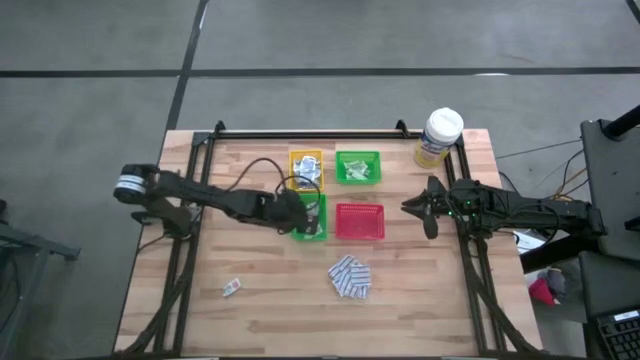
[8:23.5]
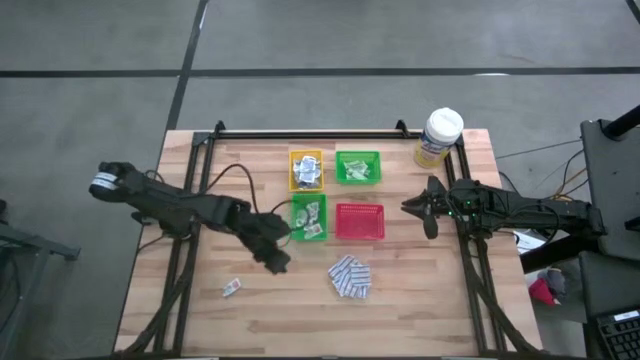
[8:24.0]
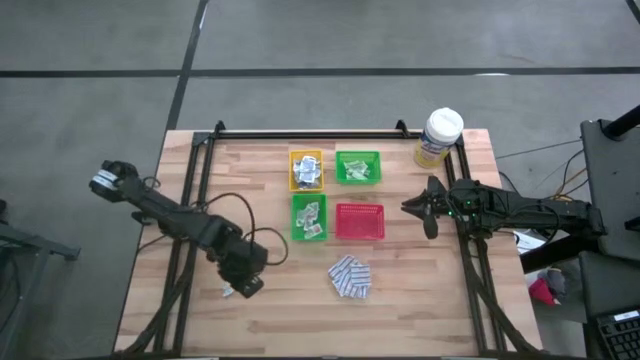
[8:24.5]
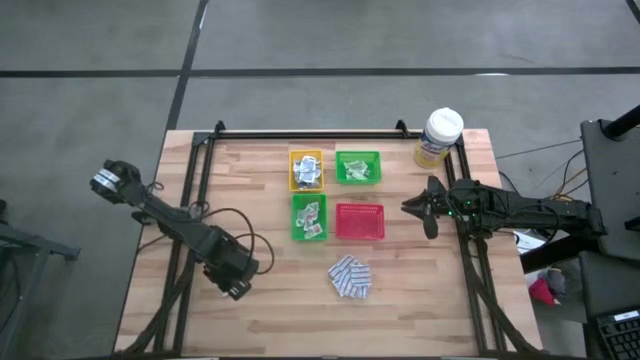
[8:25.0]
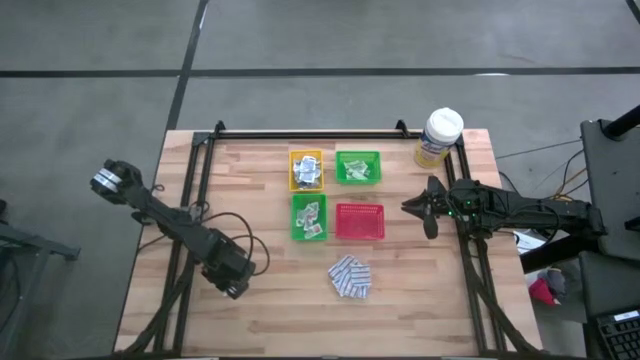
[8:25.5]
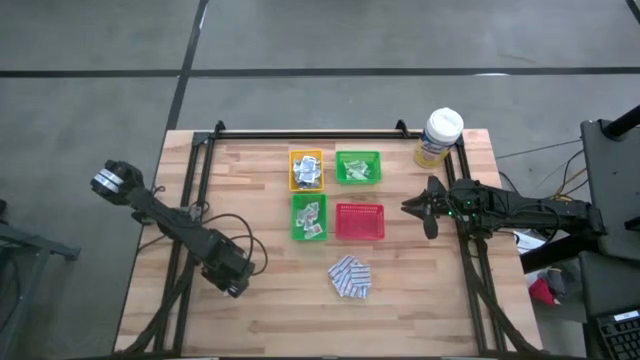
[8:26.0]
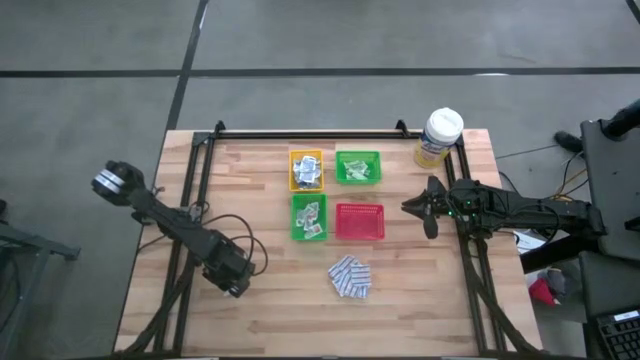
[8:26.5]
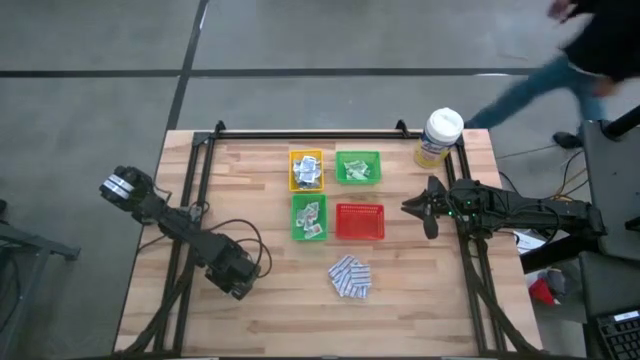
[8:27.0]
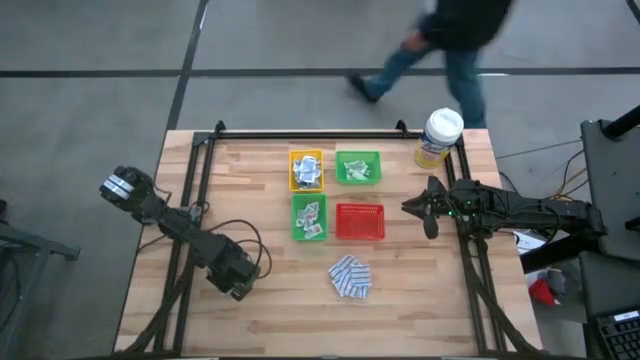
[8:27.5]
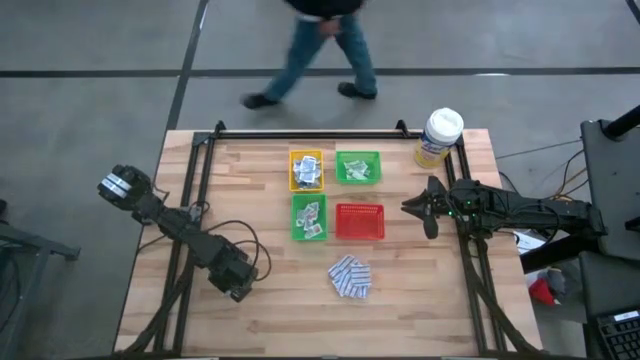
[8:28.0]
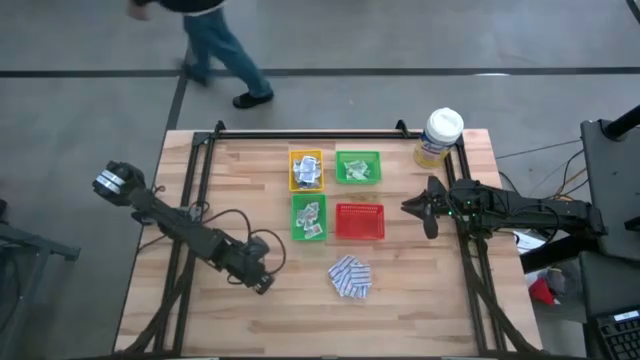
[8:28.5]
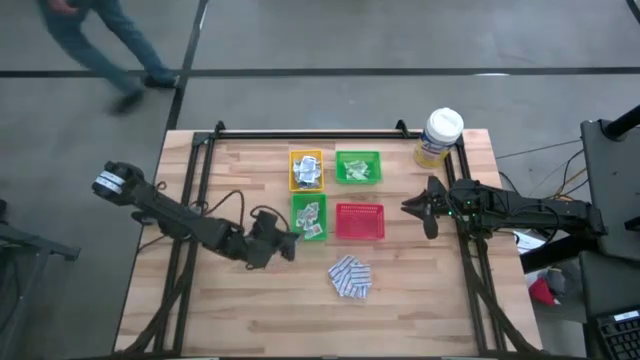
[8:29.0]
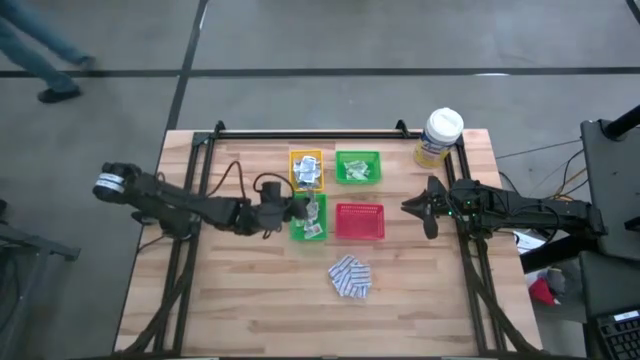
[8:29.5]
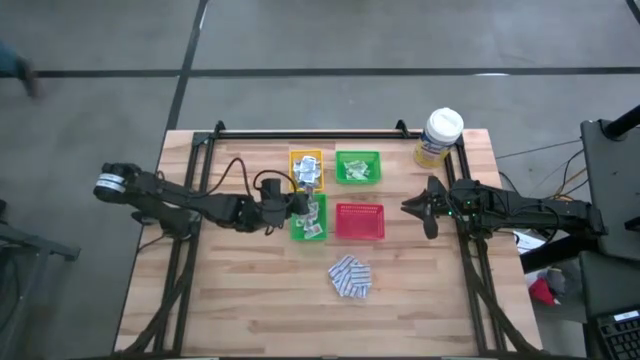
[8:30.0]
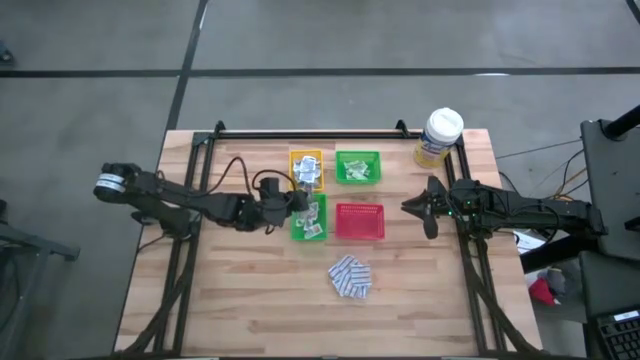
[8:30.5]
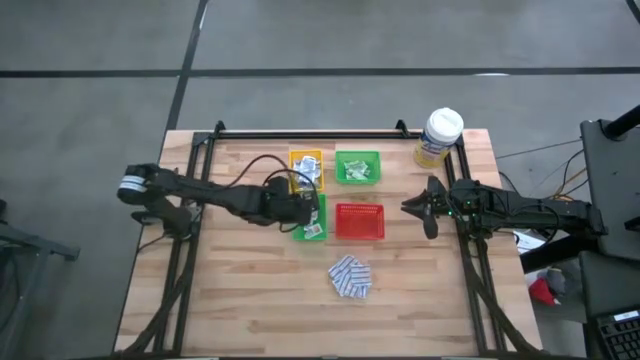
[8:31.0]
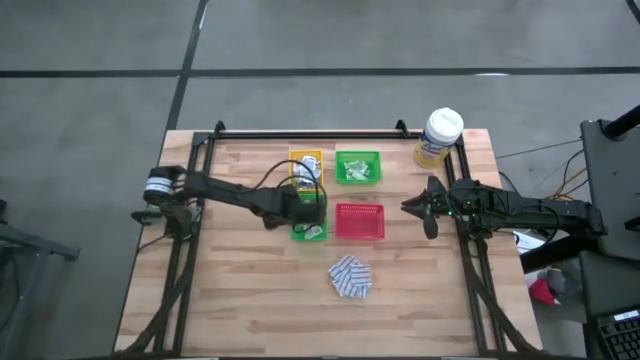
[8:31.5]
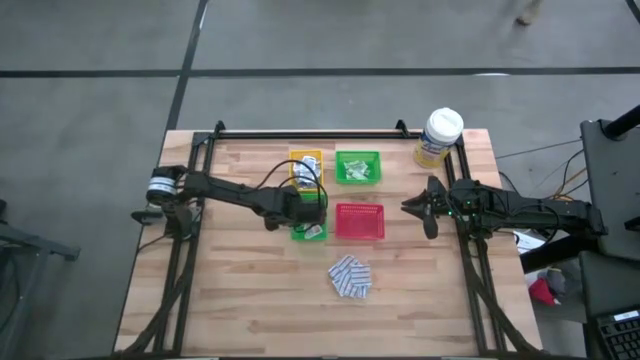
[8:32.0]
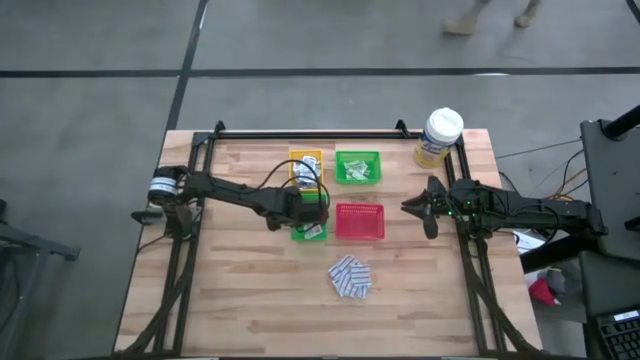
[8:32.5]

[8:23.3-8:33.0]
Task: Pick & Place First Aid Supplies
Put the orange ointment pack into the bottom green bin

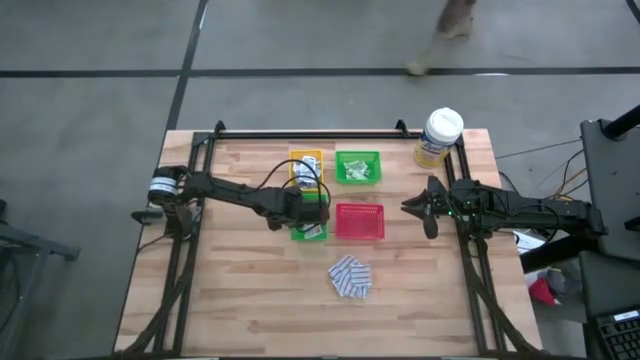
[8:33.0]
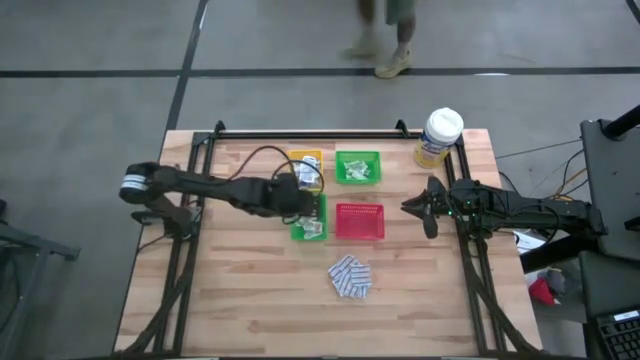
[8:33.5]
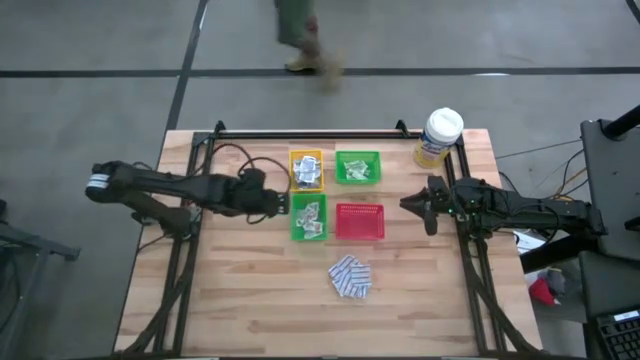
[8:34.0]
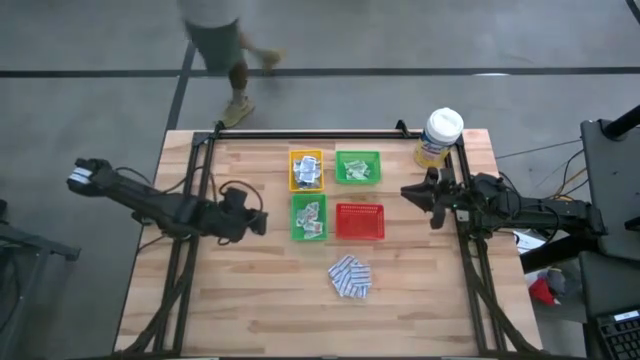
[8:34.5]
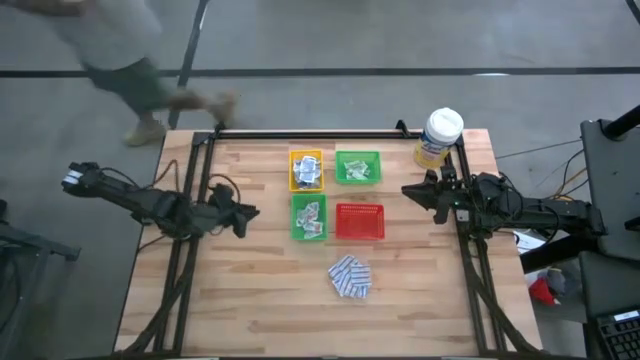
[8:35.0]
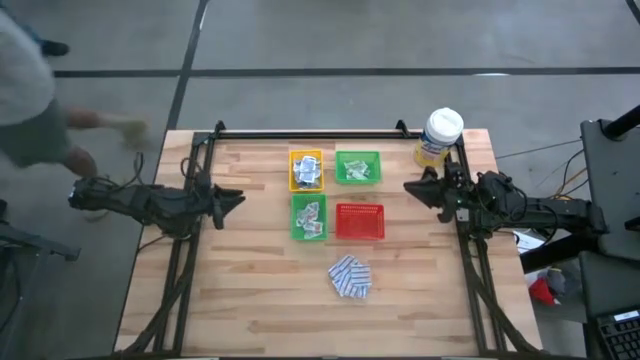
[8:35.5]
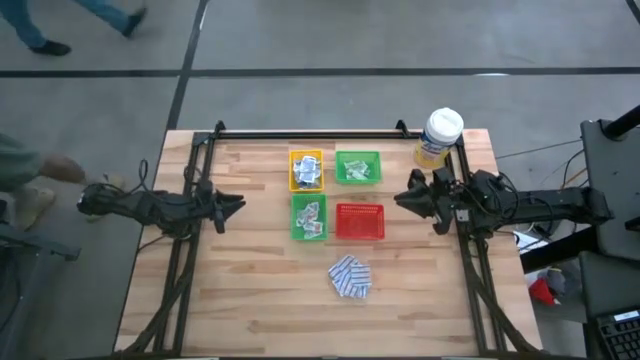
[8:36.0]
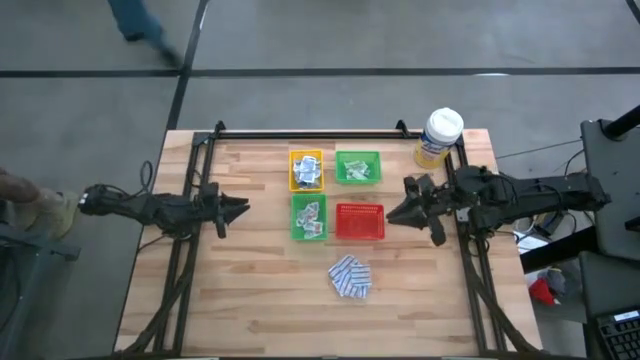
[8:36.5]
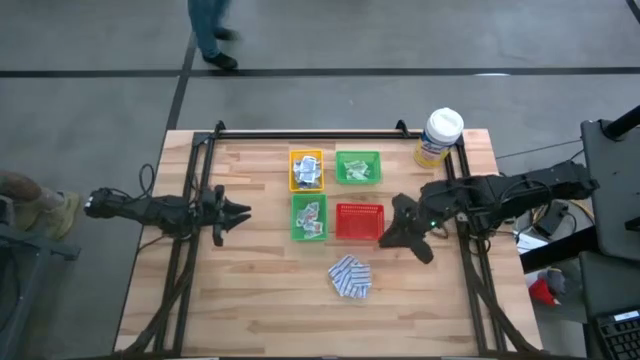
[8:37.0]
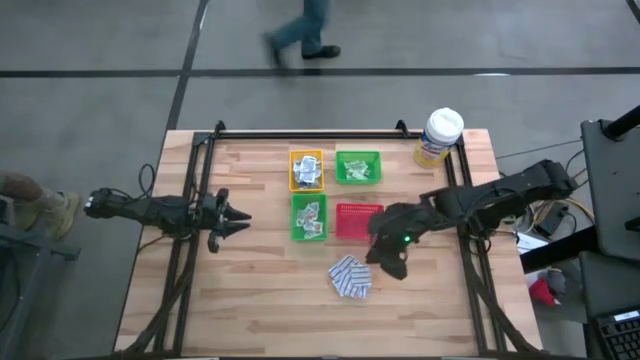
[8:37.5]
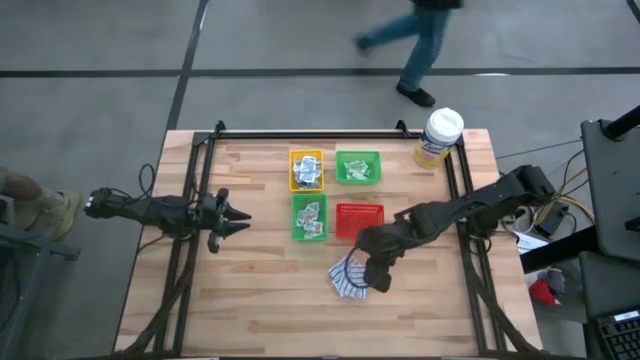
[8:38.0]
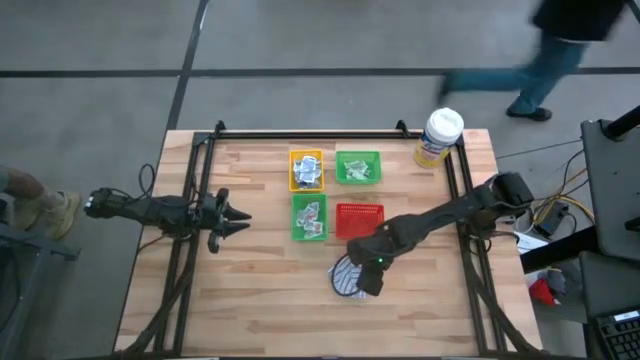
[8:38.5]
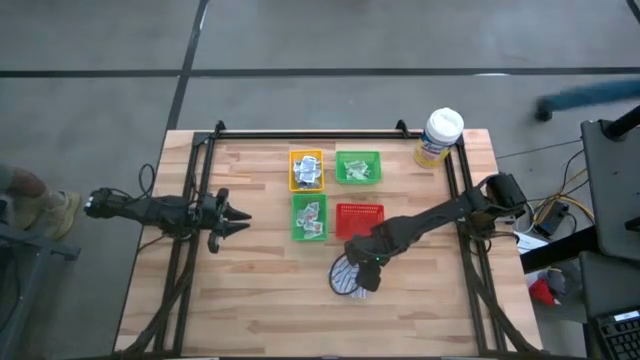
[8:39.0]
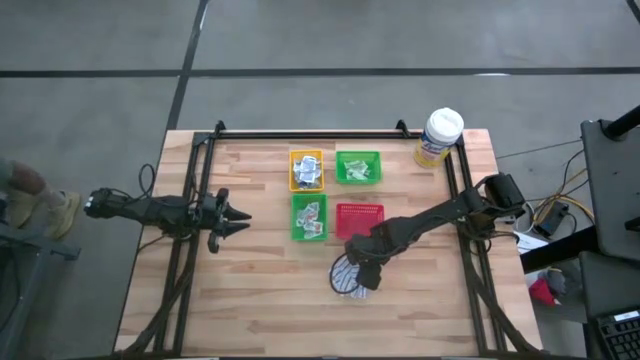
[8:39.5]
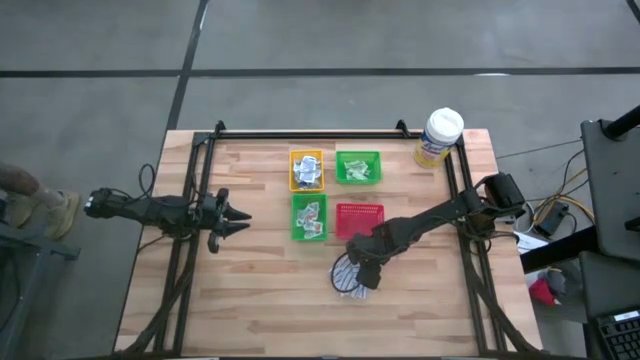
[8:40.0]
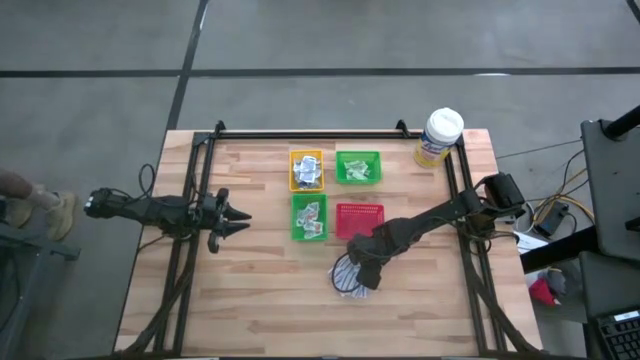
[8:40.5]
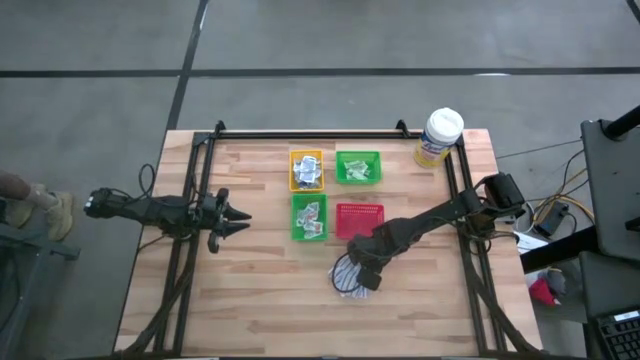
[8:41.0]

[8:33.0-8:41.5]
Put the blue bandage pack into the red bin

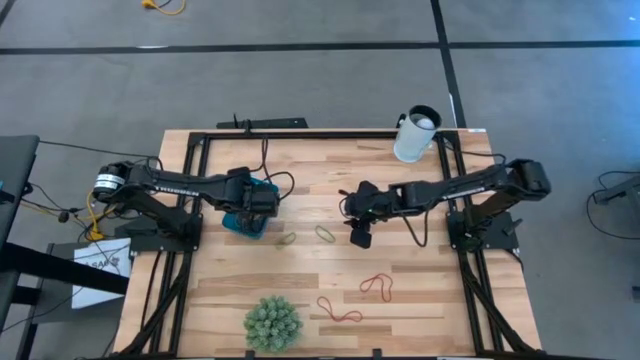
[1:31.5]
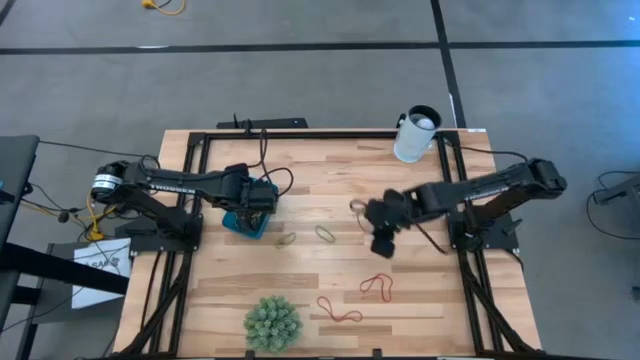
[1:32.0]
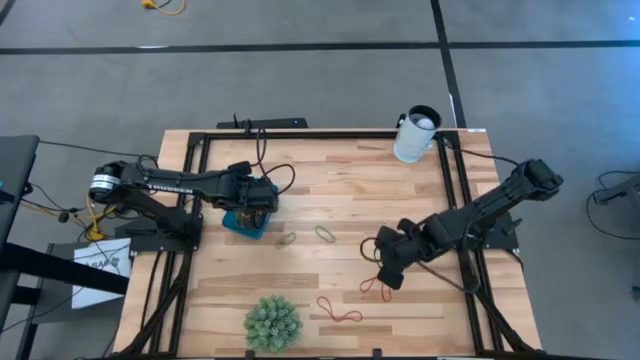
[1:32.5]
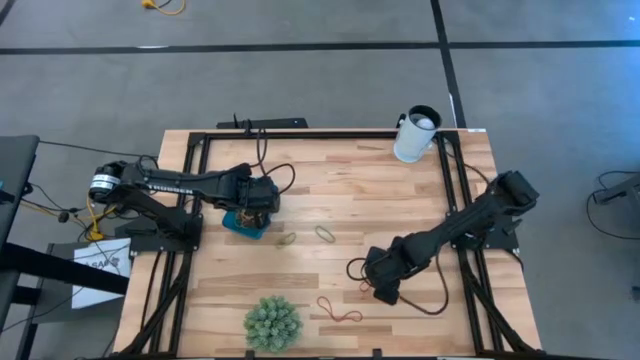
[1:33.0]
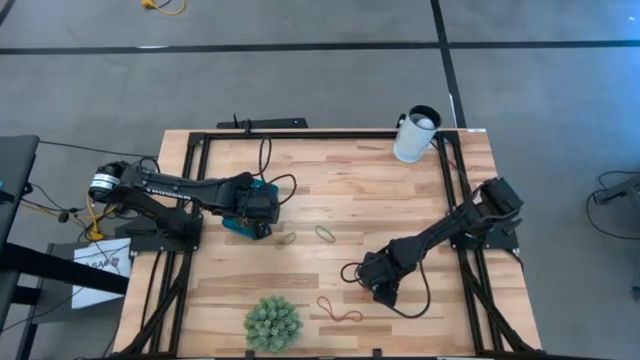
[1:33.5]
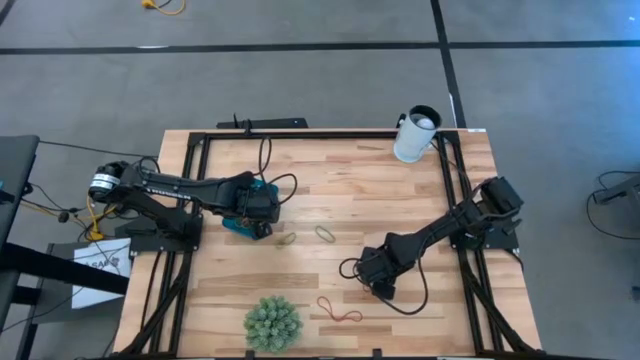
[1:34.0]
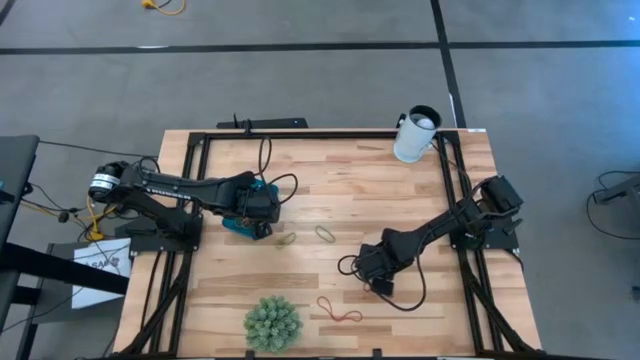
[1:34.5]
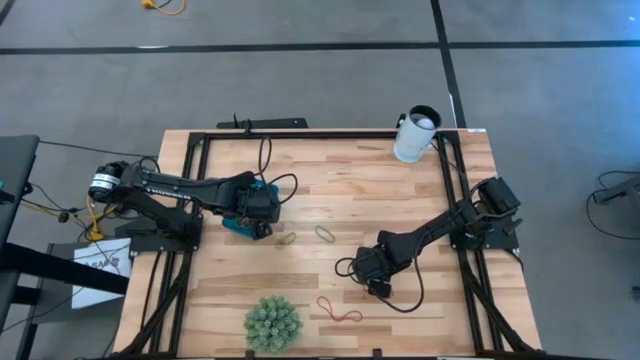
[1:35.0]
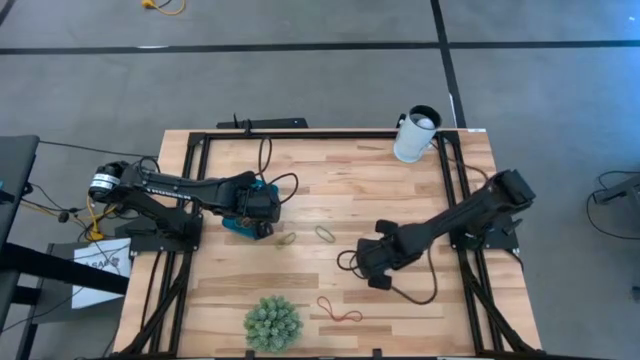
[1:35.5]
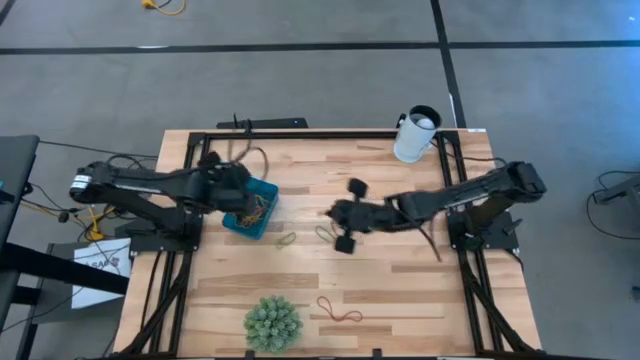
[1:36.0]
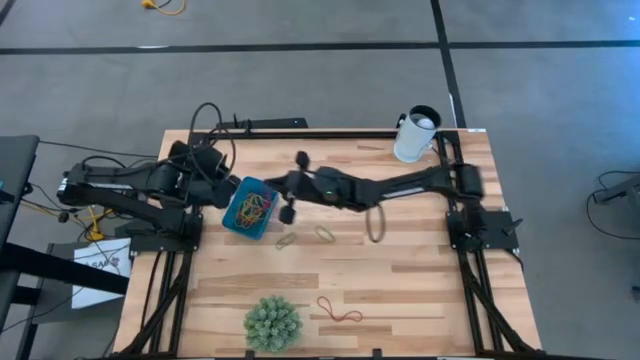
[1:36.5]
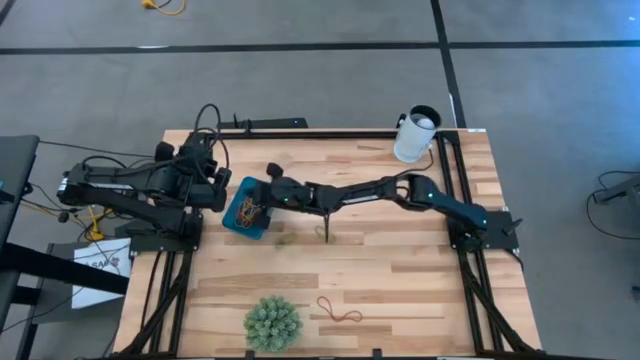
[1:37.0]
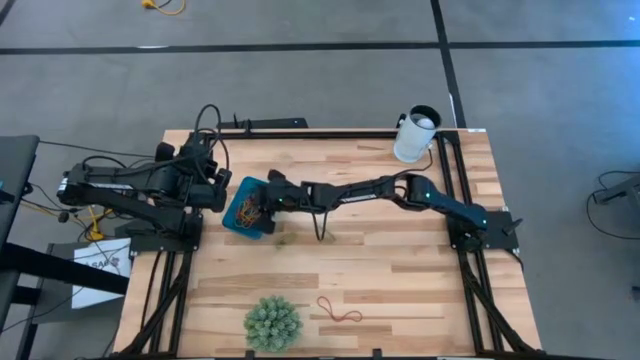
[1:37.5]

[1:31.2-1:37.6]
Task: Pick and place items into bin
Put the red rubber band into the blue bin
